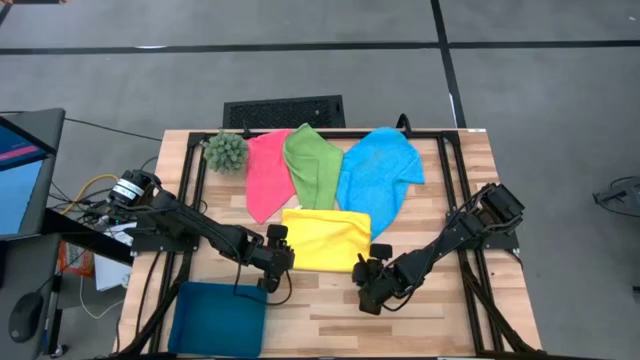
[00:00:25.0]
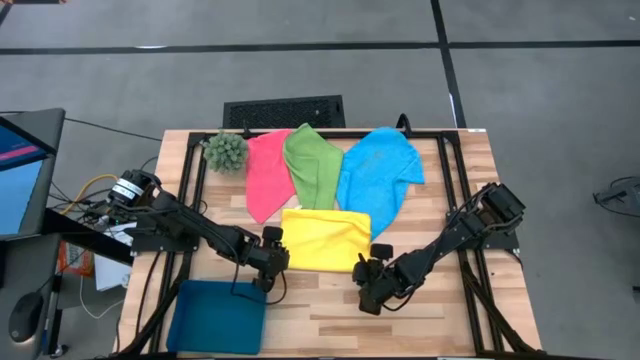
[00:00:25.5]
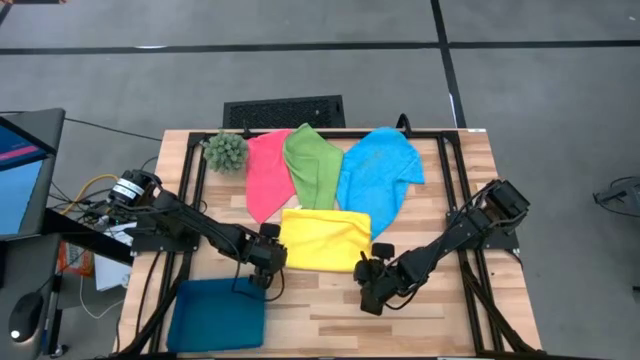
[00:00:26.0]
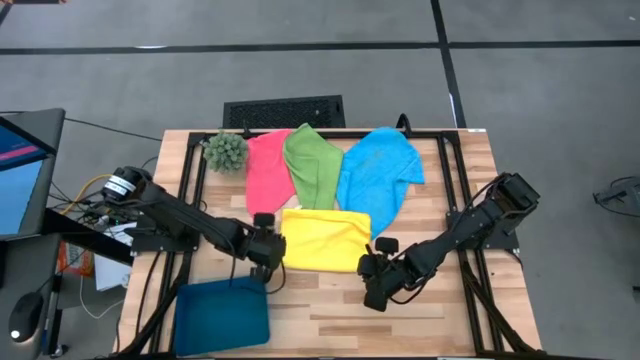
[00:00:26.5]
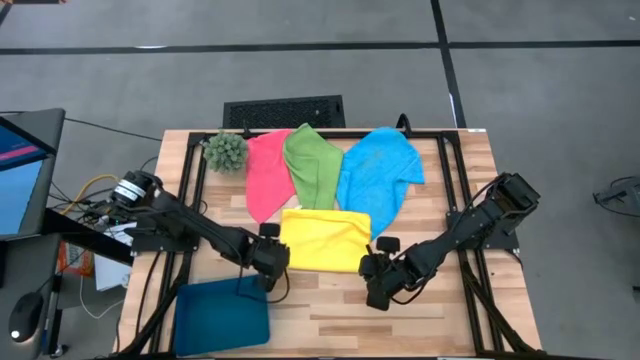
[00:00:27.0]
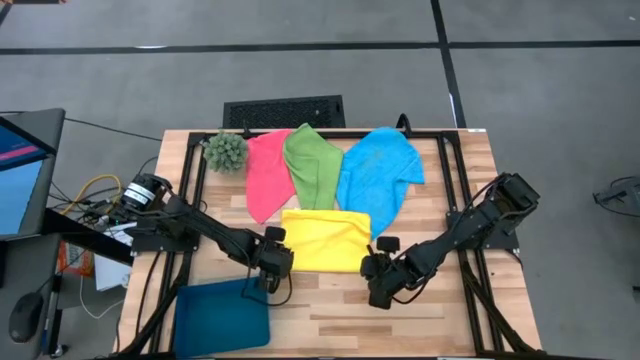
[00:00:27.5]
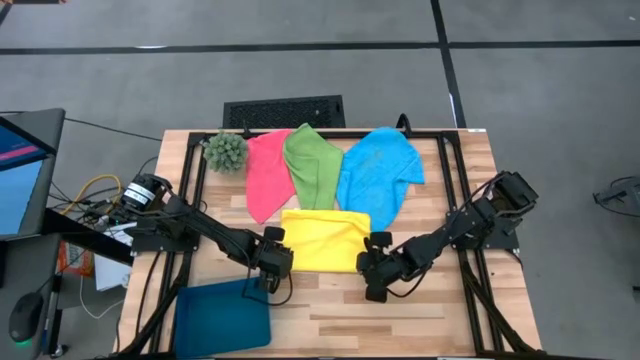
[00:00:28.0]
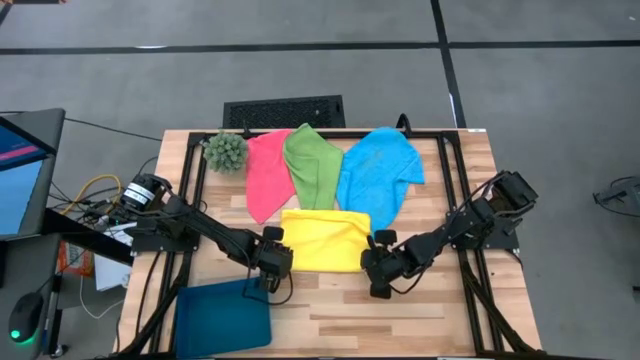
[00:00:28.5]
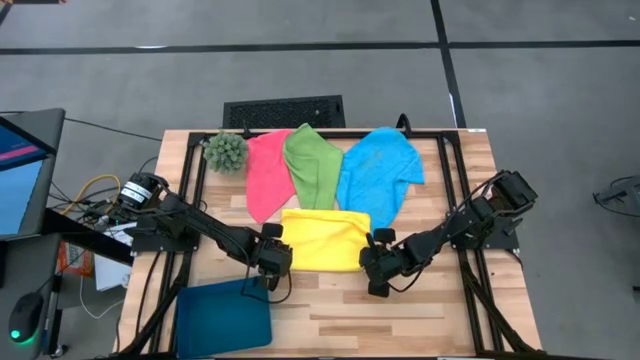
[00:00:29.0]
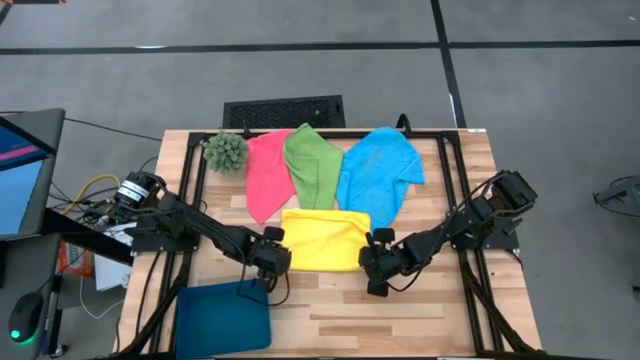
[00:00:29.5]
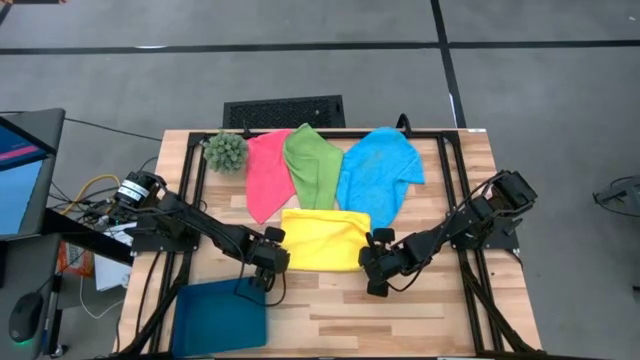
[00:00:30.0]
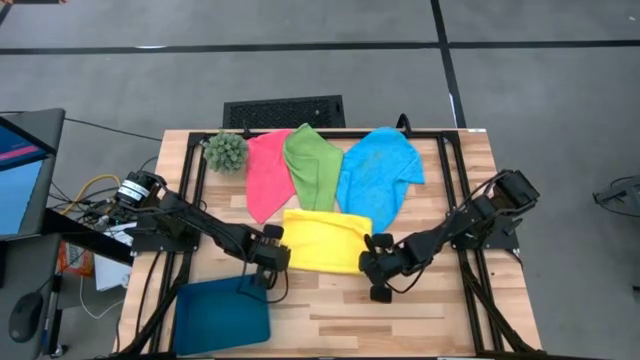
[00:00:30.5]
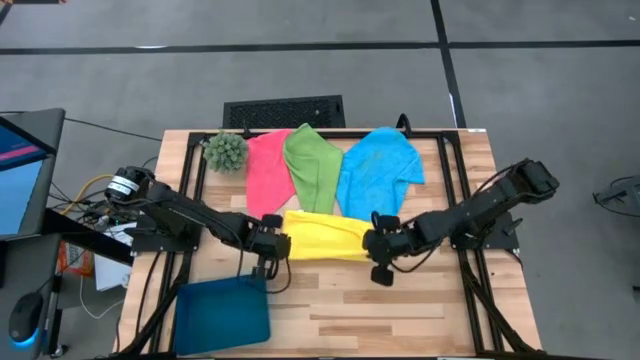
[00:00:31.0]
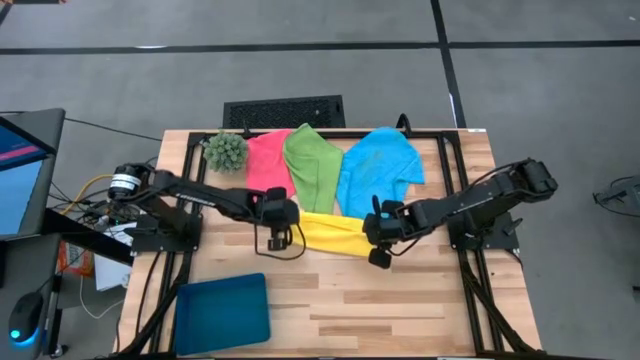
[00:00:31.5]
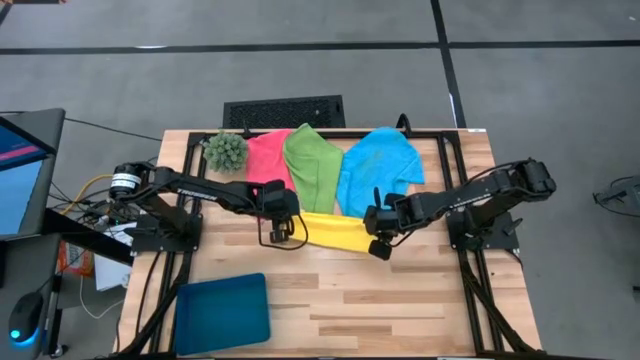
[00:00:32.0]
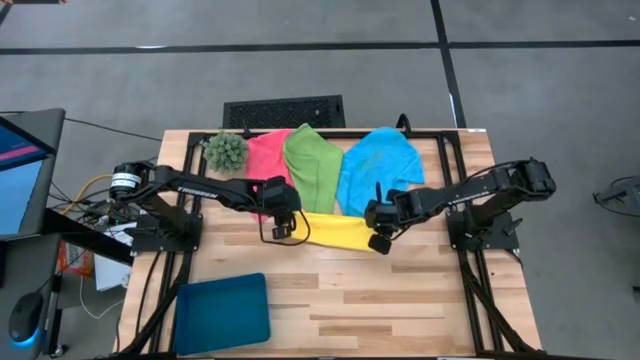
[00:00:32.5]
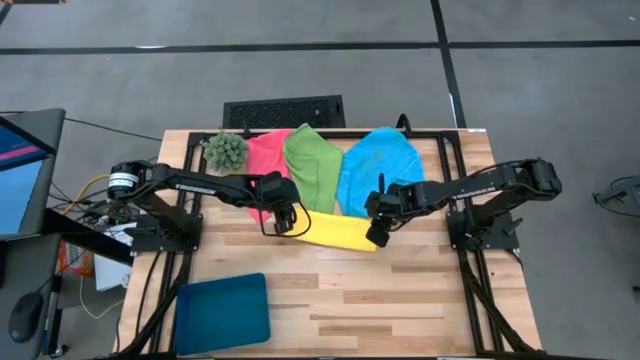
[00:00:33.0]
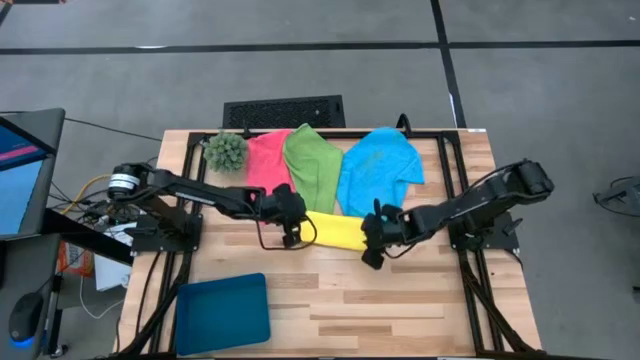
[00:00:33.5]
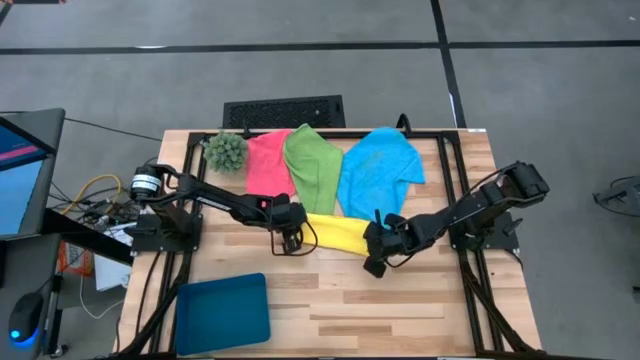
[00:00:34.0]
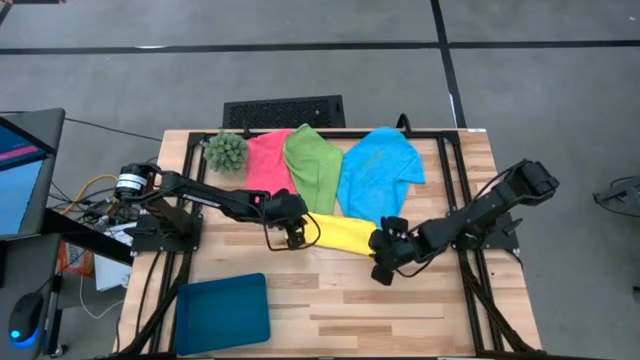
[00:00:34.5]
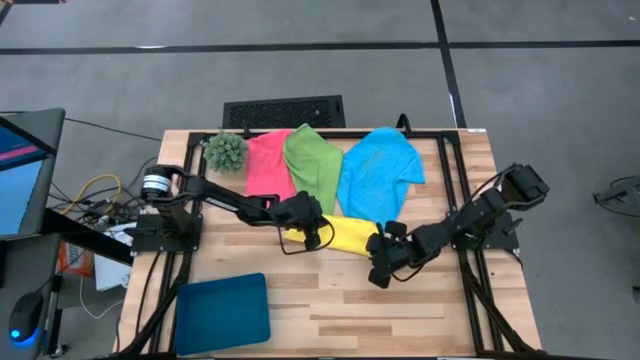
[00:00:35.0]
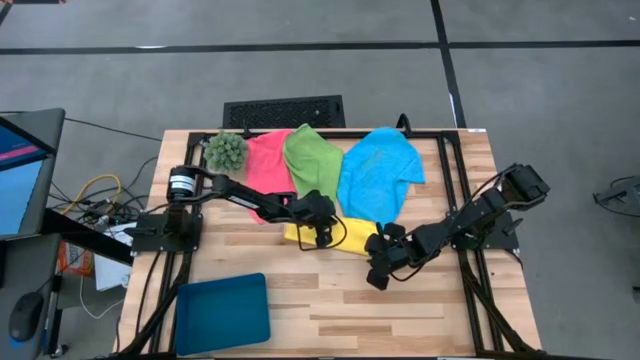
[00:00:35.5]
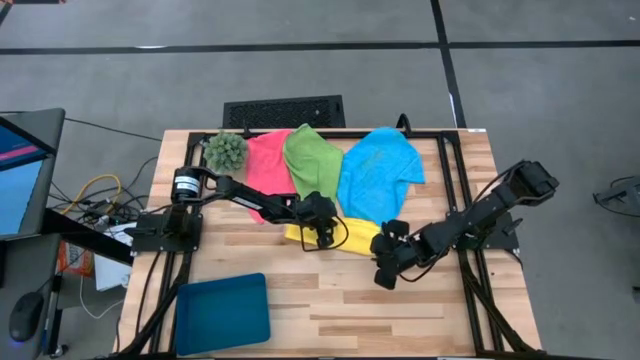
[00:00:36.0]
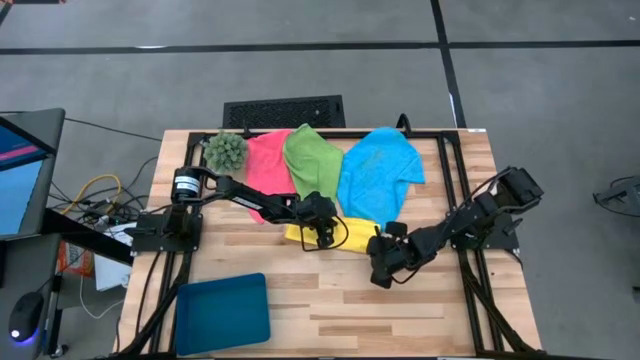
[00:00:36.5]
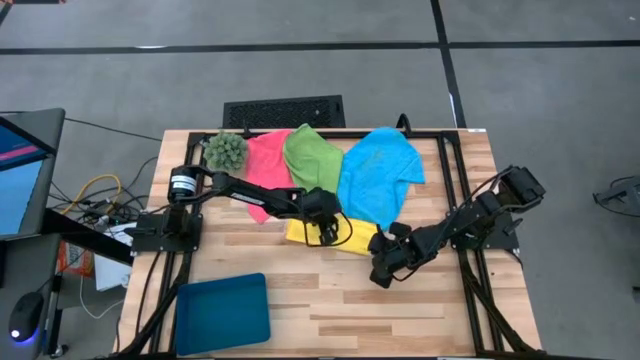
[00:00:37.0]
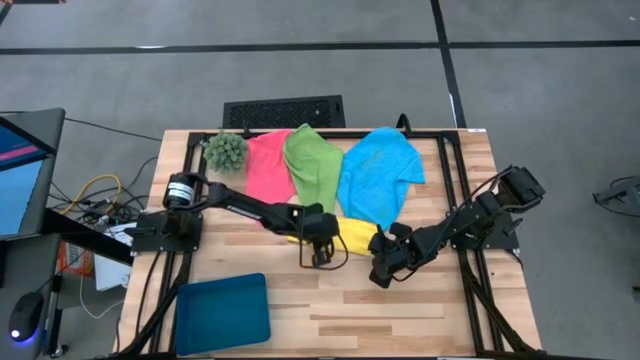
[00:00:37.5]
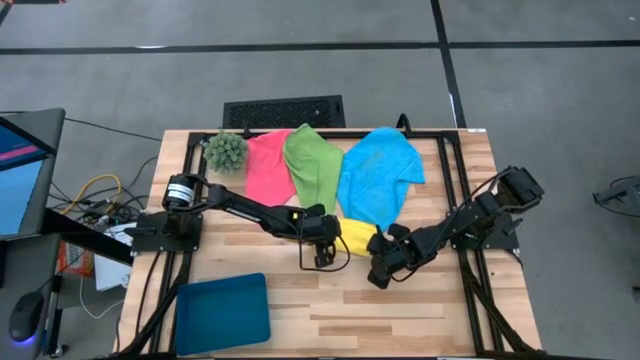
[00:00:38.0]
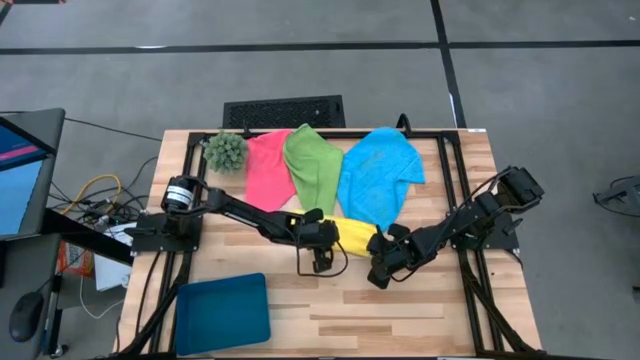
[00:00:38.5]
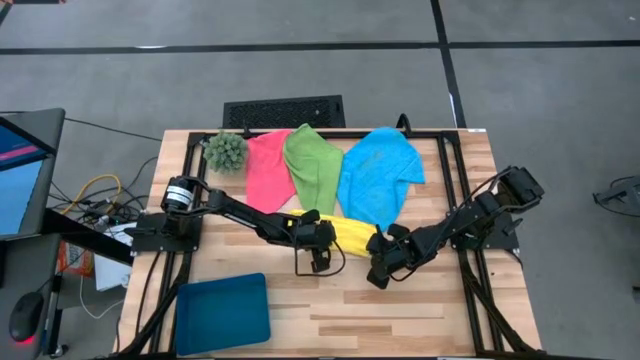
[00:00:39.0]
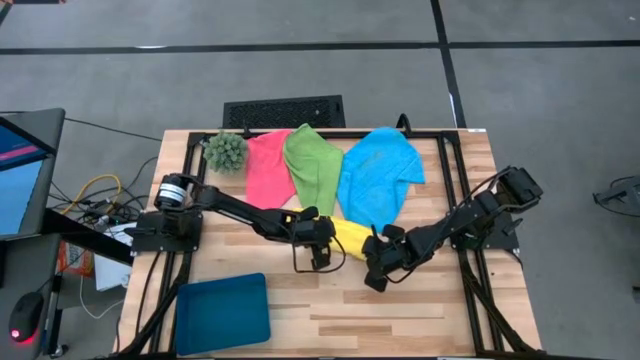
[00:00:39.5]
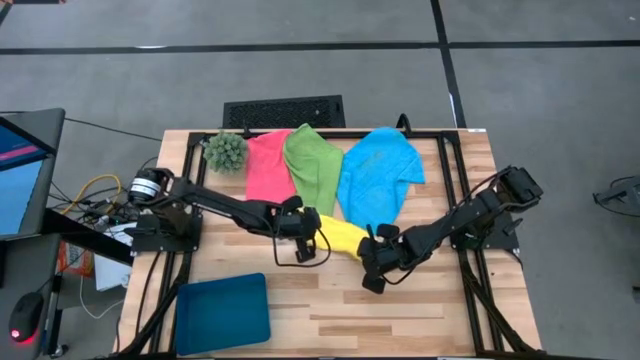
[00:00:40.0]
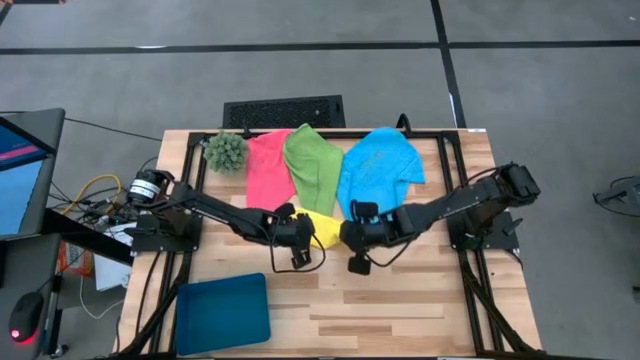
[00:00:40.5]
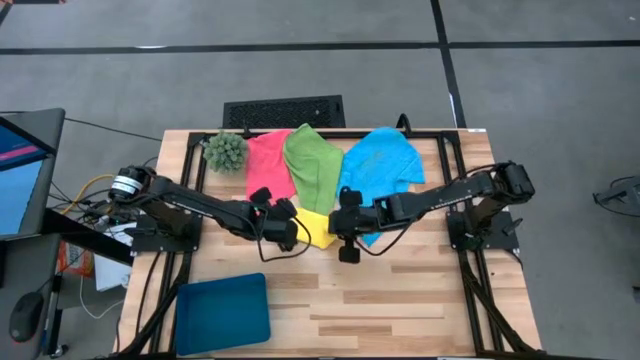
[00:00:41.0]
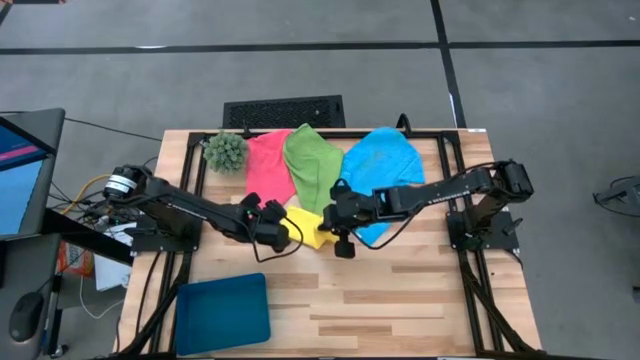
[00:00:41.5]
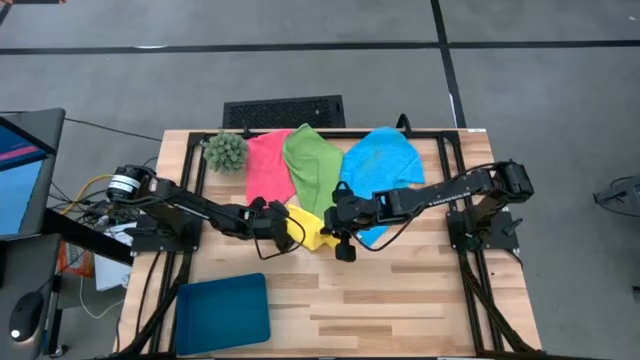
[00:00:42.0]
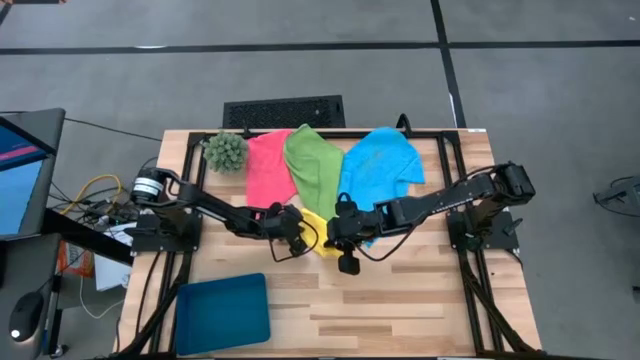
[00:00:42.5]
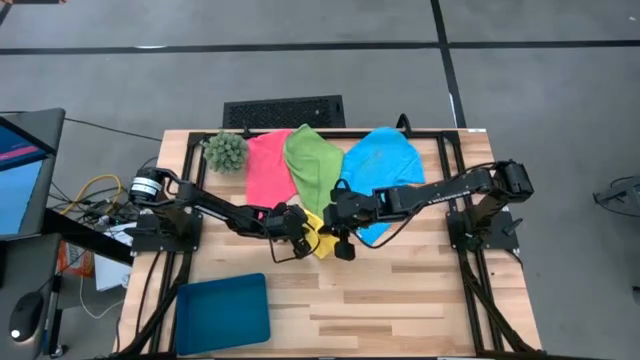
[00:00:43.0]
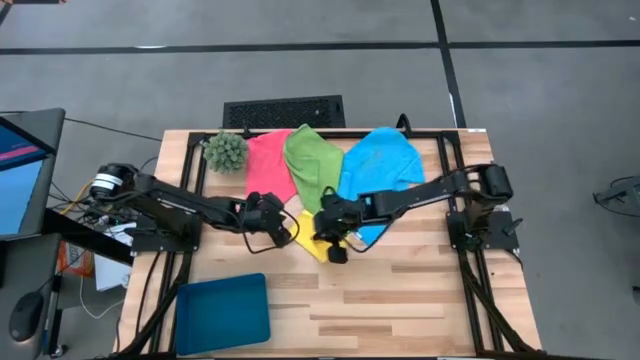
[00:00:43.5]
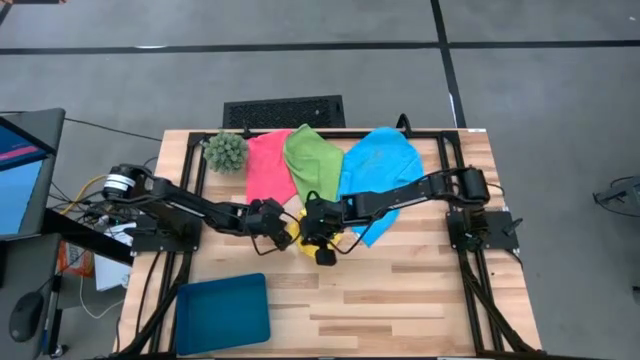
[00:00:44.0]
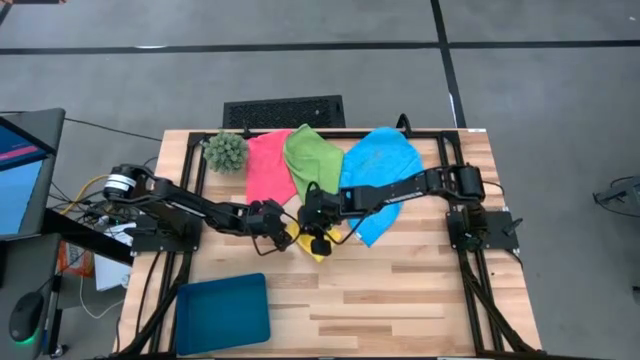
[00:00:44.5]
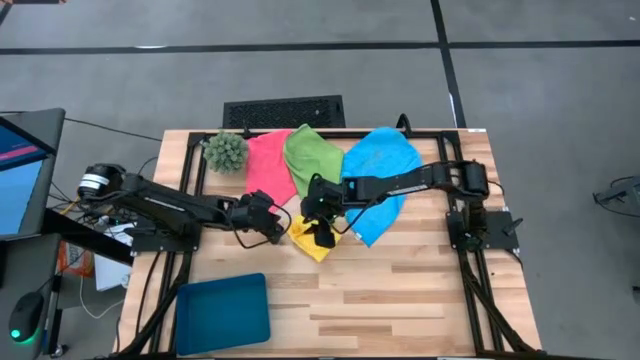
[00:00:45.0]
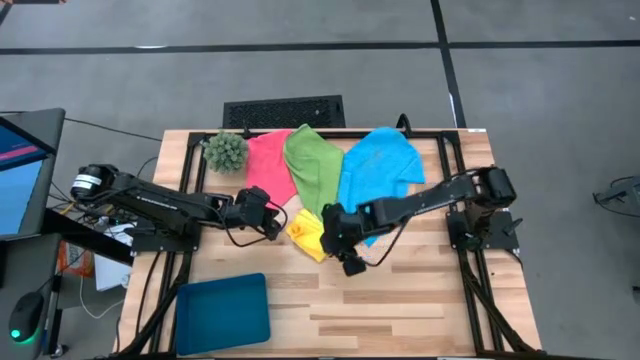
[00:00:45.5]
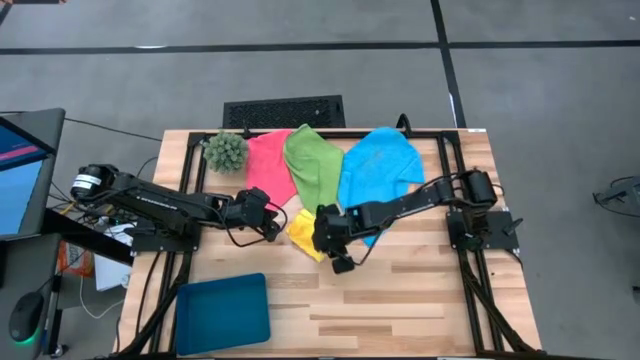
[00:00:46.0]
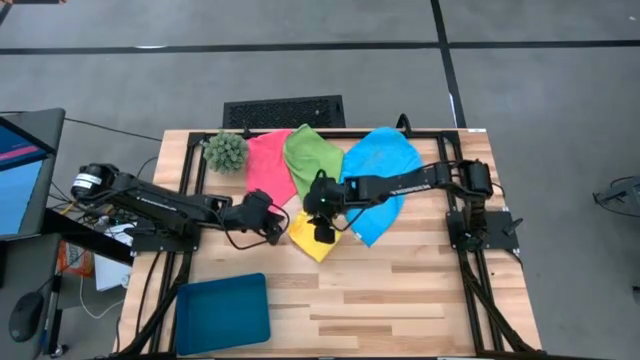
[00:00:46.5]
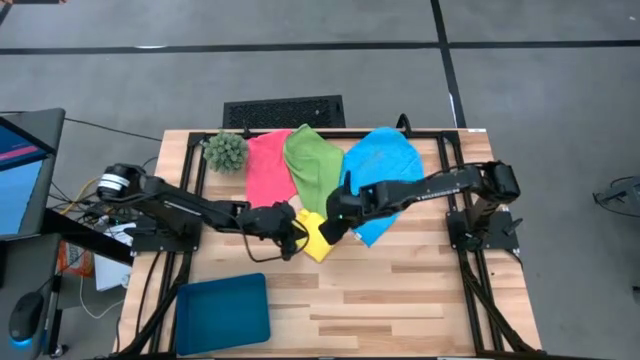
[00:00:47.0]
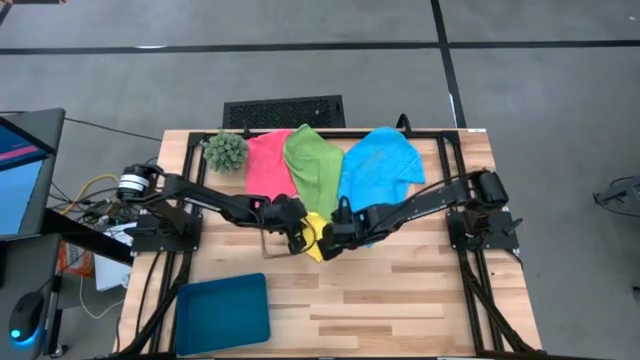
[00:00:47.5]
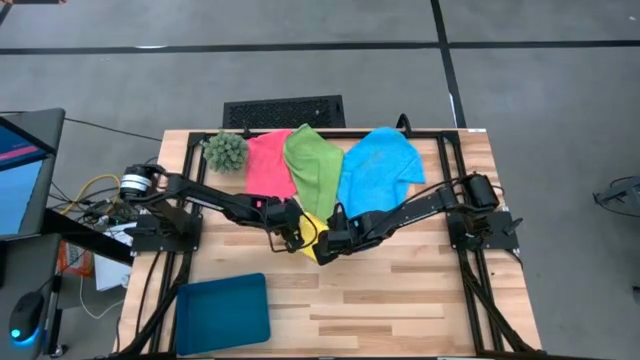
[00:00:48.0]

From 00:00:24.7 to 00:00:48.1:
Task: Fold microfiber towels
Fold the yellow microfiber towel
